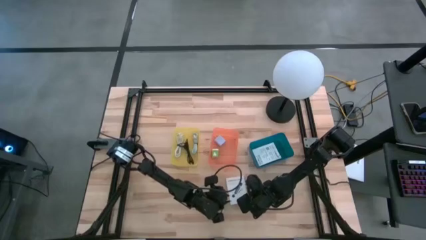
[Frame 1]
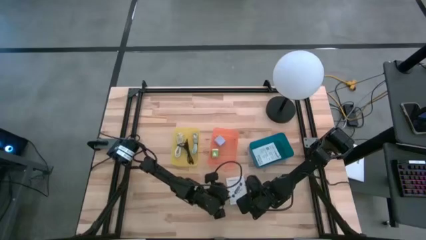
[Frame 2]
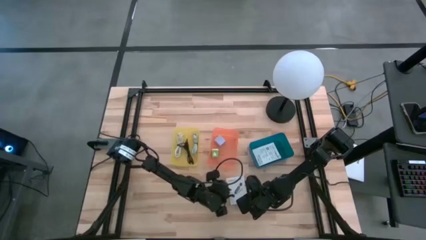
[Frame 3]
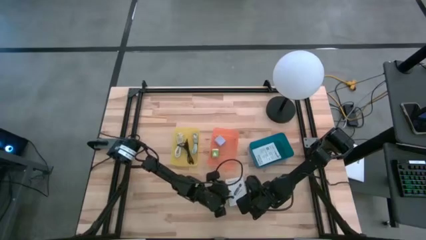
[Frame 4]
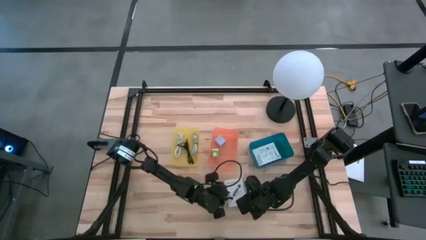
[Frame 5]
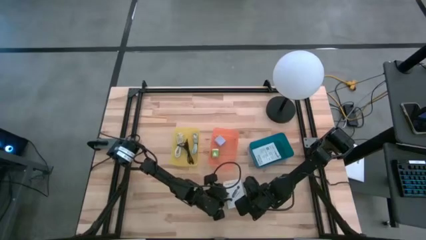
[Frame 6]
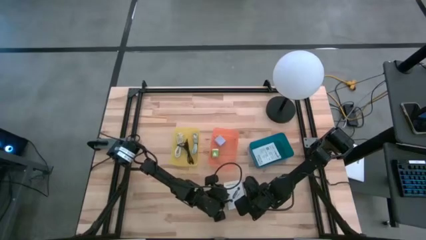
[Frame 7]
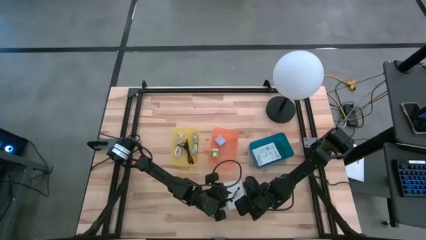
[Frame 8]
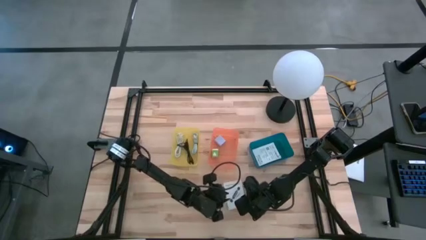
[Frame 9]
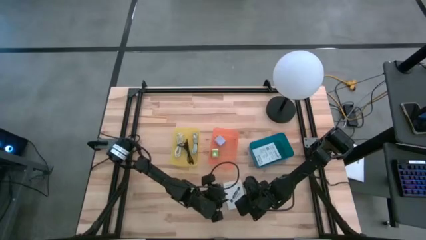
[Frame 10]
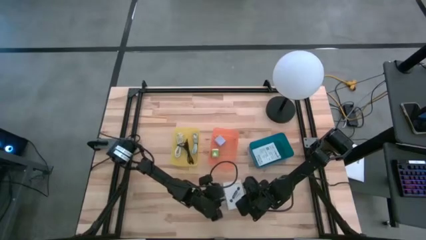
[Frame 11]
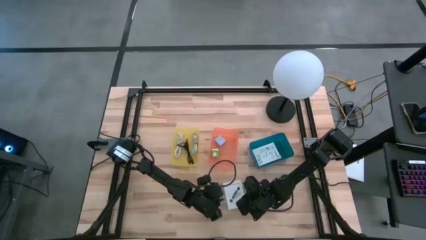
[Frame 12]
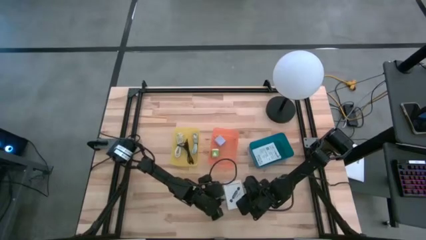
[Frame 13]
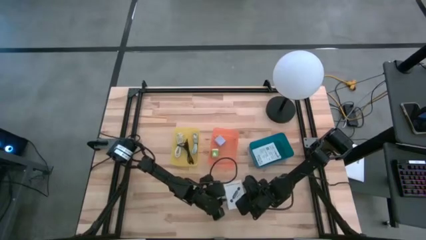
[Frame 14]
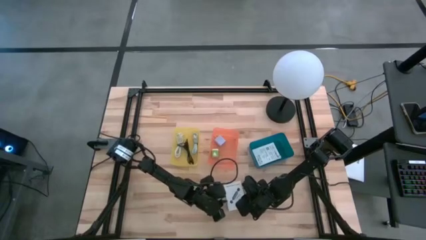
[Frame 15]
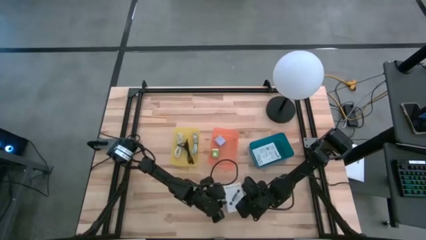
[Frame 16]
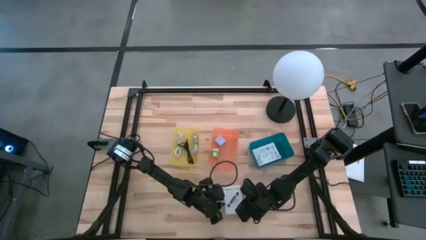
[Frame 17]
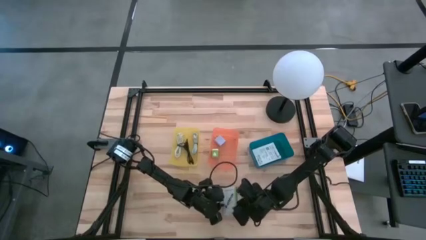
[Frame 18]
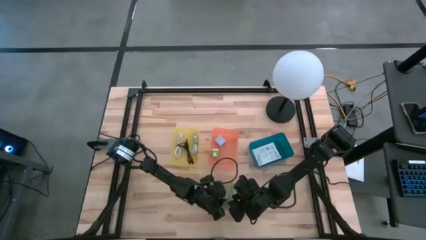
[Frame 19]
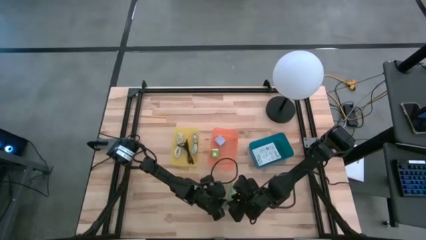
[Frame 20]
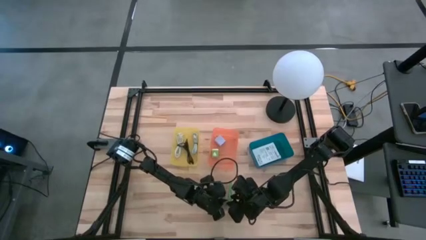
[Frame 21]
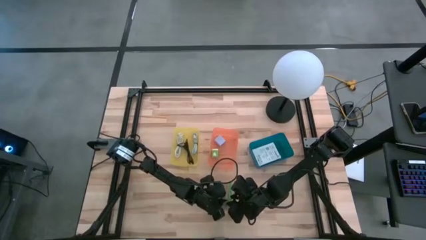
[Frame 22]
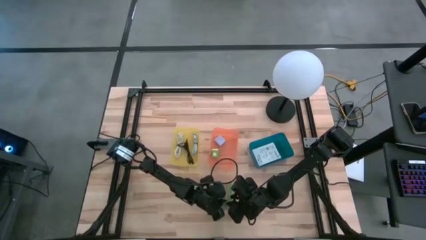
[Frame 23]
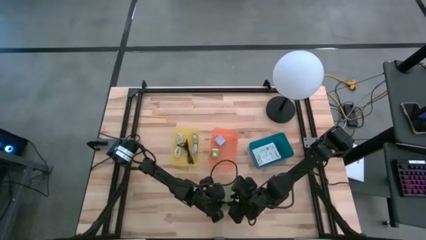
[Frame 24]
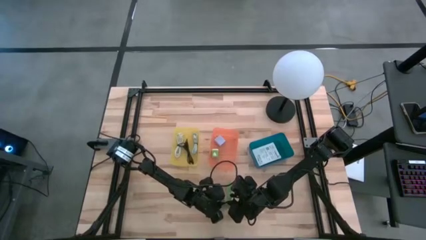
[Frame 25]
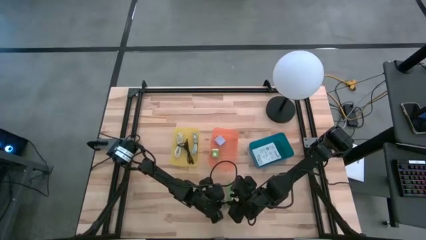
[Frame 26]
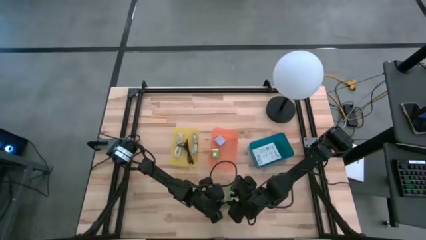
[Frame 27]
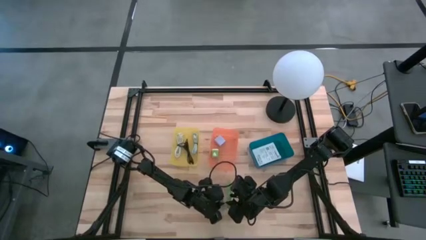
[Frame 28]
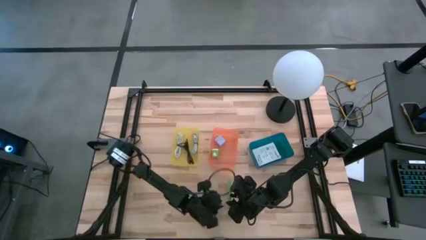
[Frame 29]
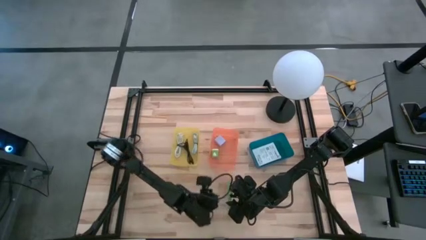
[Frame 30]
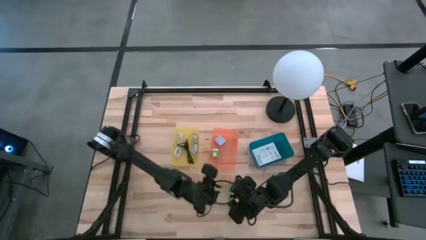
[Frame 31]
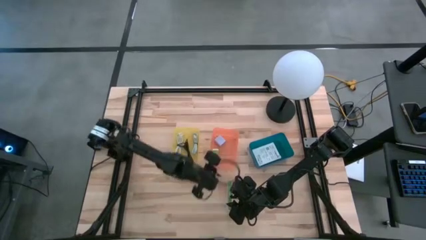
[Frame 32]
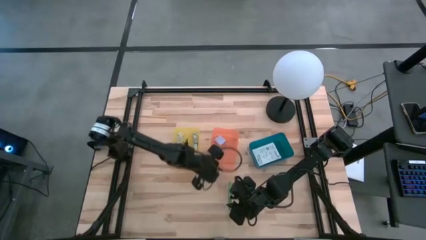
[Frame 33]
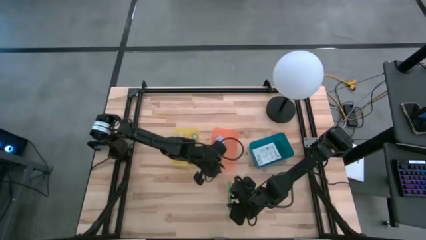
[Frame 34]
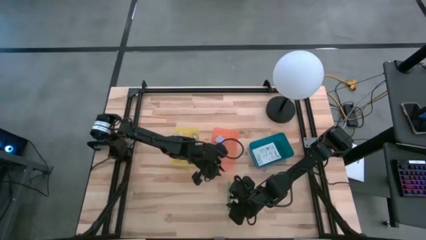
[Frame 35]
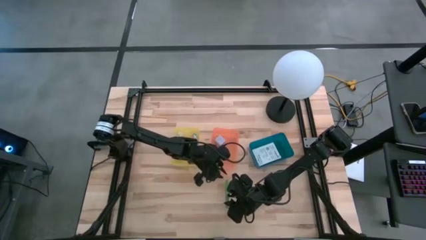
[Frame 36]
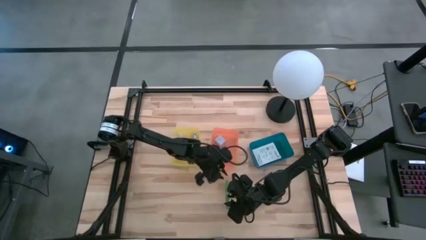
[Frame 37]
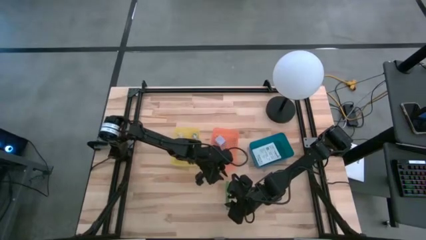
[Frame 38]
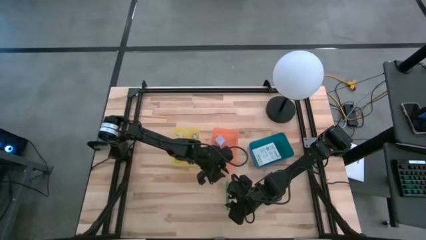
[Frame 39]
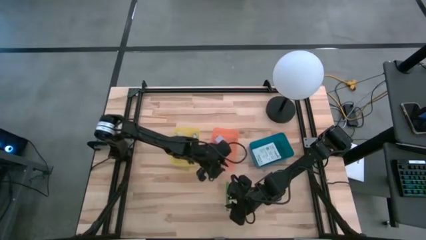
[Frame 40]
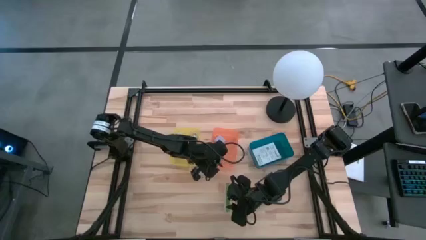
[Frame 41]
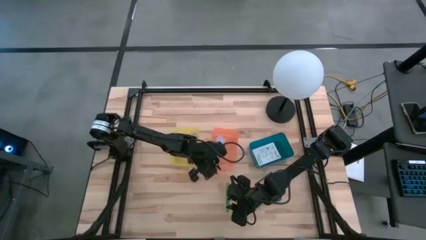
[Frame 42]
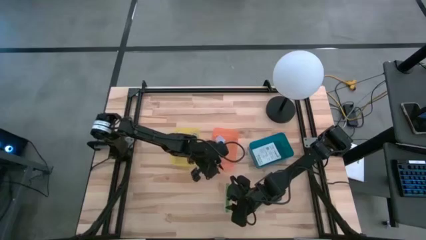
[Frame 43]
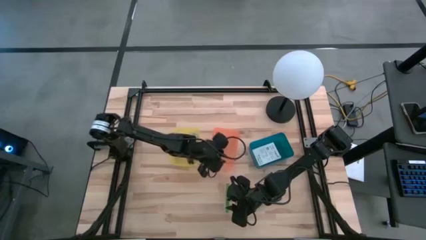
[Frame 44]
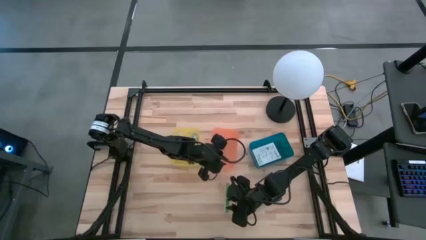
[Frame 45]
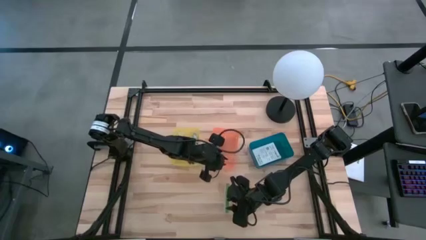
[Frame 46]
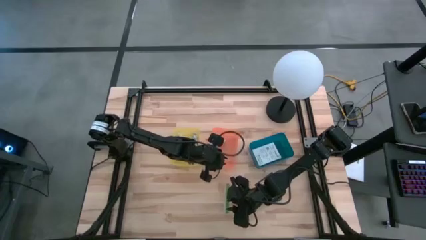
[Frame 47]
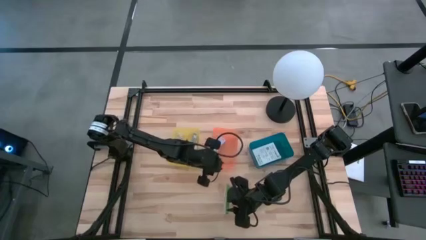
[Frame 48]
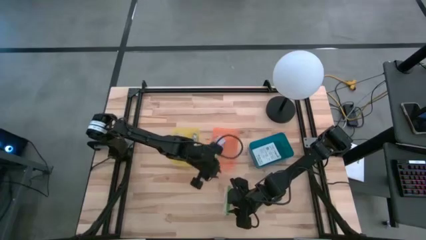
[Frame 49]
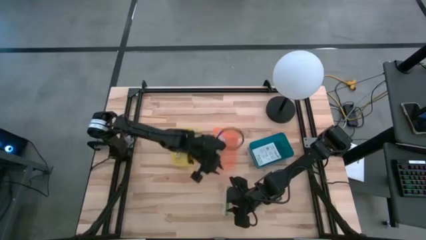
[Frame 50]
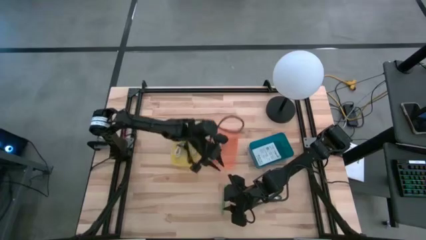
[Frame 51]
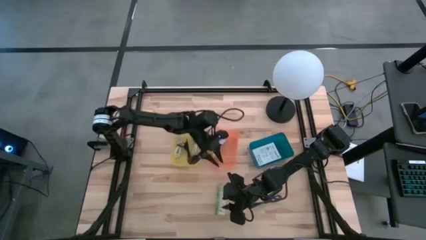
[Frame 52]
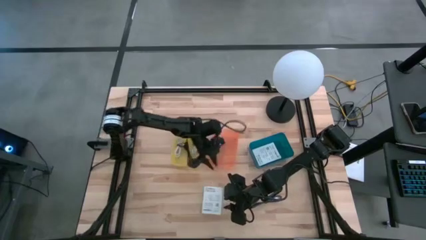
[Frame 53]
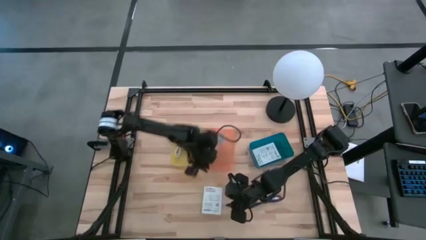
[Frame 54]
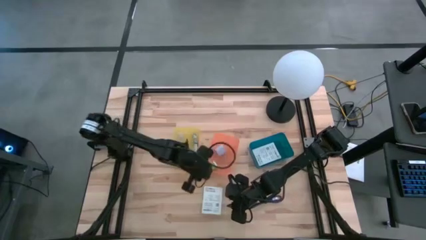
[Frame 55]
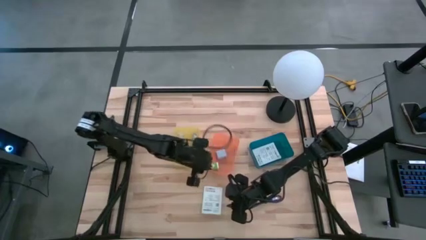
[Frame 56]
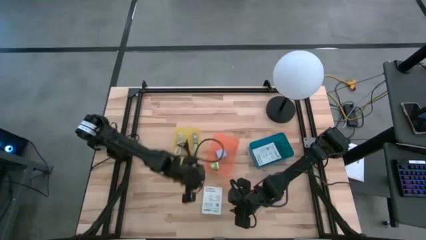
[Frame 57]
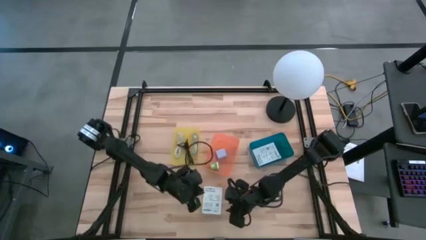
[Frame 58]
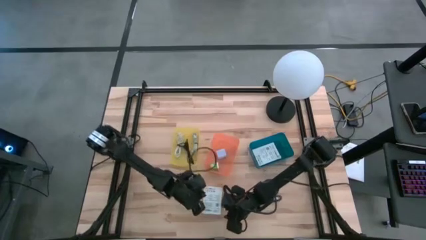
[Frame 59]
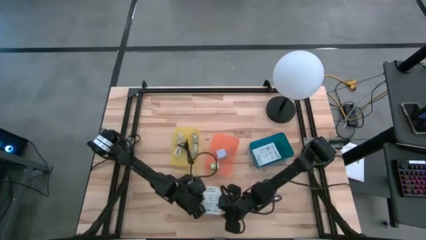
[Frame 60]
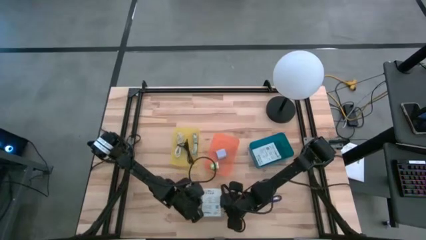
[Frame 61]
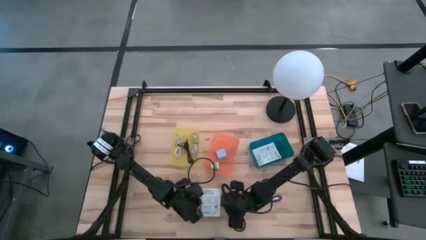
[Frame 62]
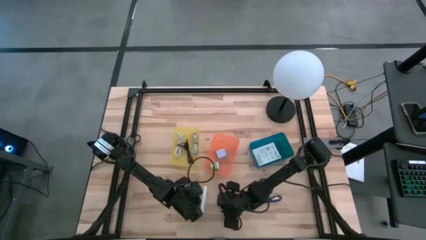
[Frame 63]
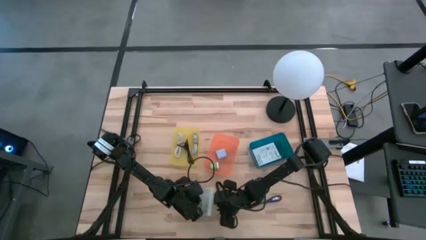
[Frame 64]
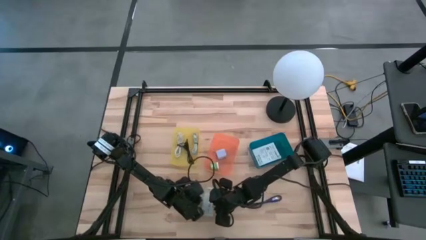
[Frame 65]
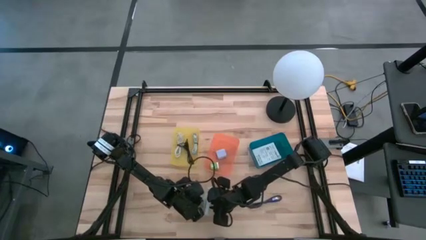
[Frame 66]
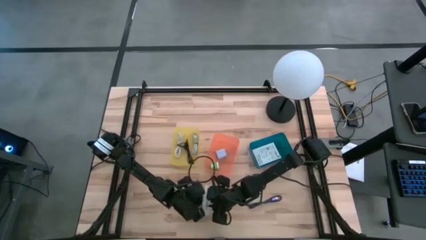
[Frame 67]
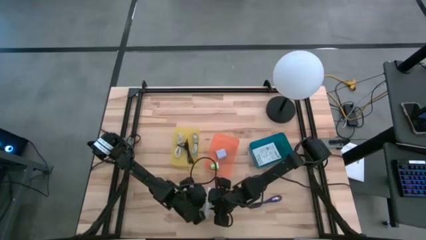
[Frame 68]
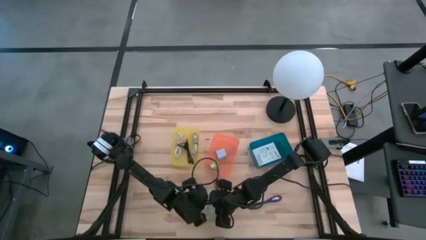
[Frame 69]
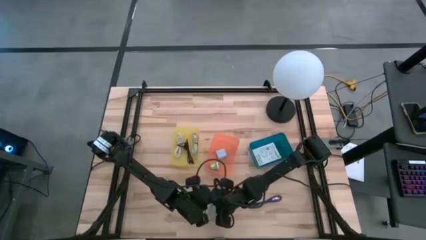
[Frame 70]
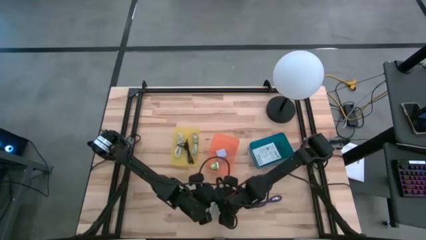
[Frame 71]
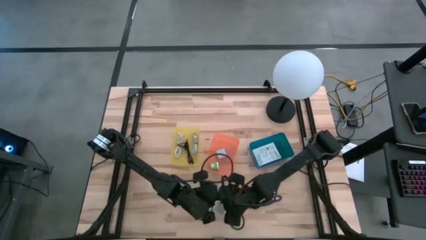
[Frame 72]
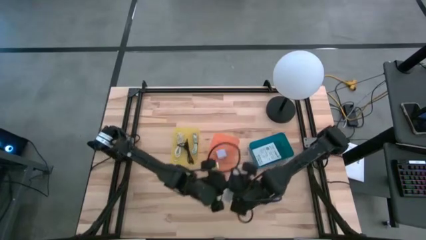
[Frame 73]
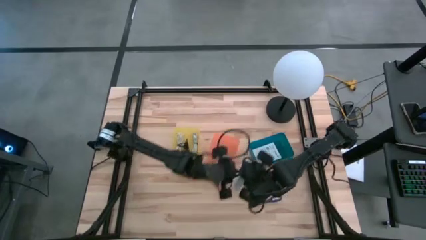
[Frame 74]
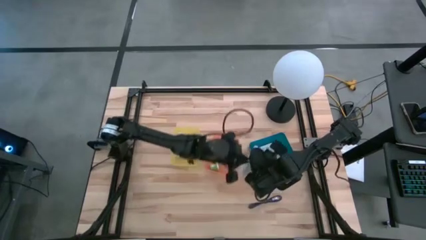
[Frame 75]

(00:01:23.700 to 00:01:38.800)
Task: Pick and place items into bin
Put the white card reader box into the blue bin

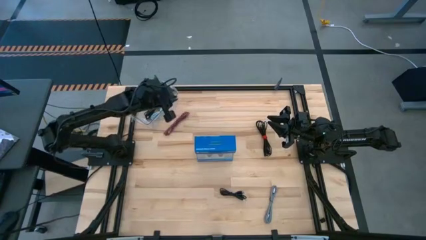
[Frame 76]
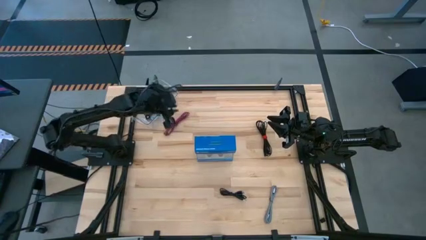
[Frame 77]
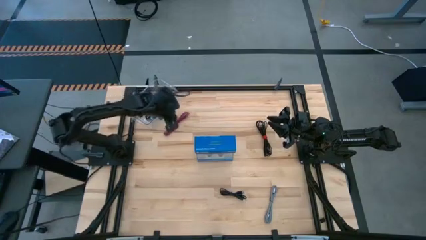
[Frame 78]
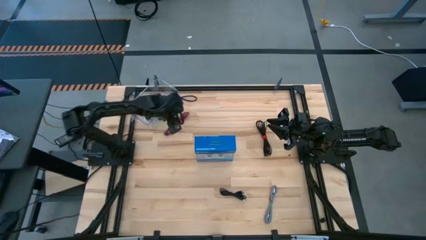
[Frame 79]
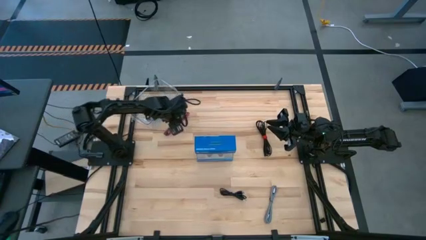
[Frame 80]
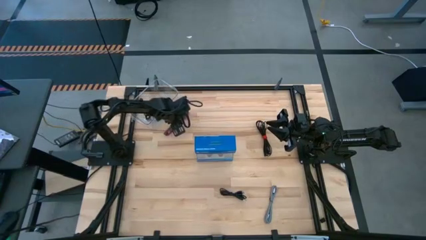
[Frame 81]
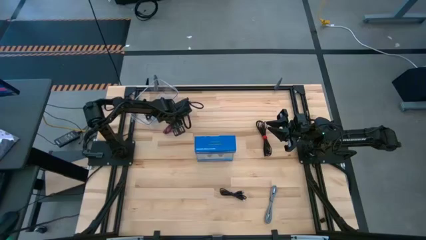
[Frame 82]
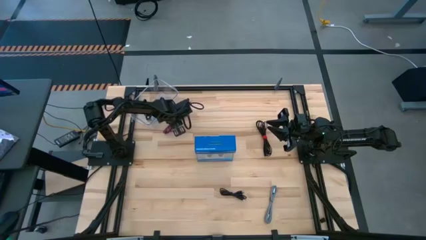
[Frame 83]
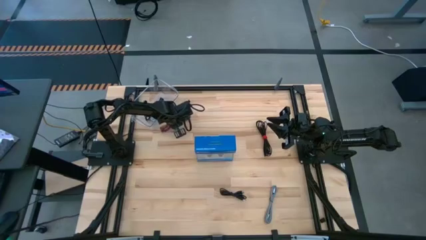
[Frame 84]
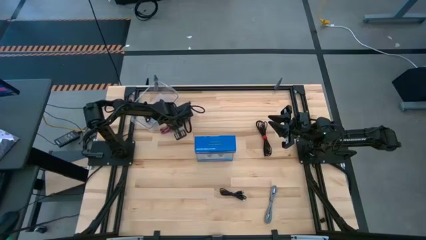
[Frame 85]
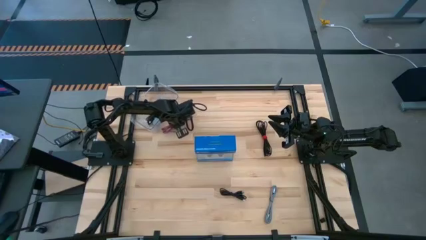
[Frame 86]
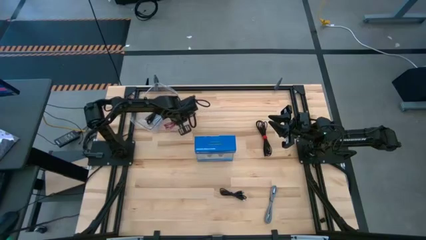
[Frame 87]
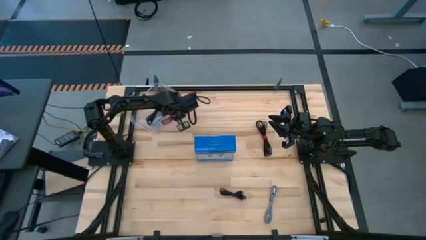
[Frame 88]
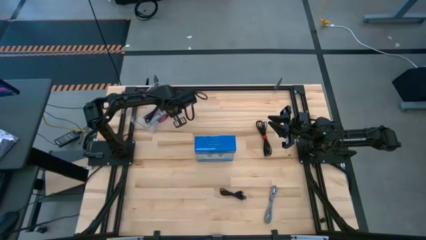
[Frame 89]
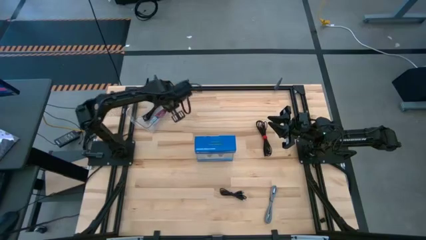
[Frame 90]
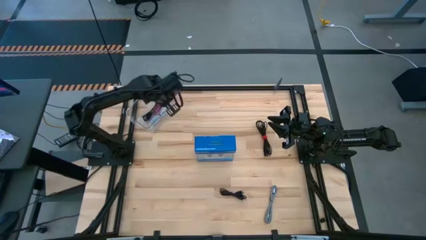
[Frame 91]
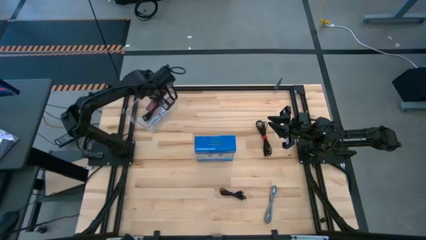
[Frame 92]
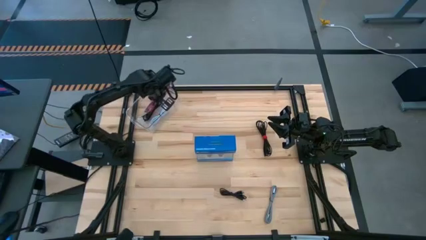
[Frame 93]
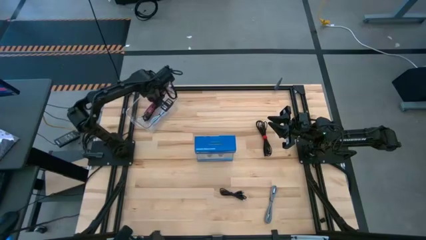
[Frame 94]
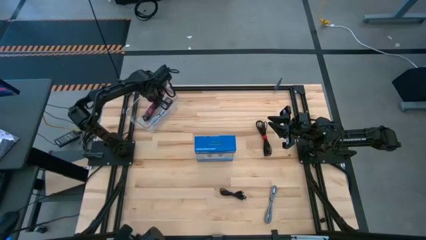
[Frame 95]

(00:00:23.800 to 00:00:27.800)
Task: Pick and place USB-C Cables
Put the pink charger cable into the transparent bin
